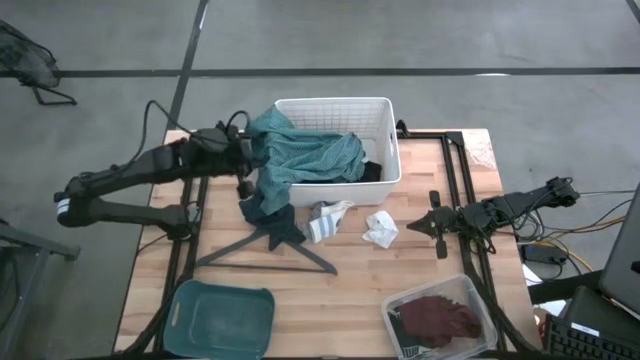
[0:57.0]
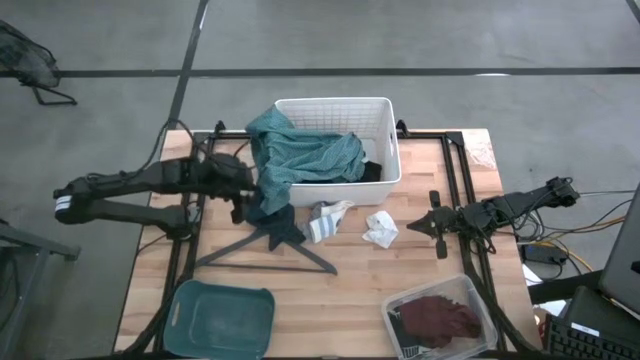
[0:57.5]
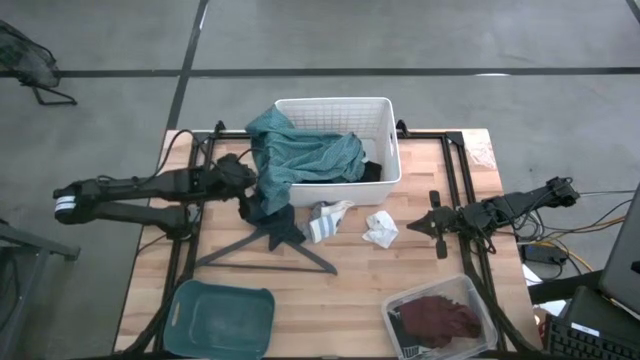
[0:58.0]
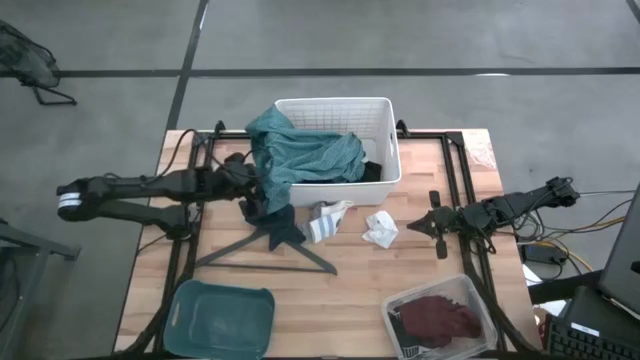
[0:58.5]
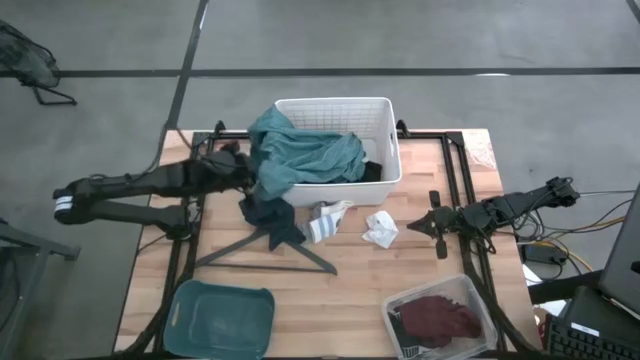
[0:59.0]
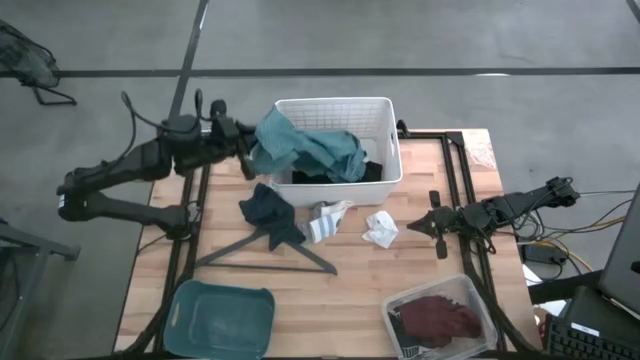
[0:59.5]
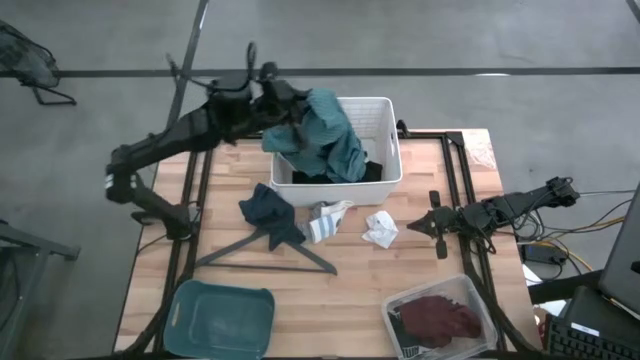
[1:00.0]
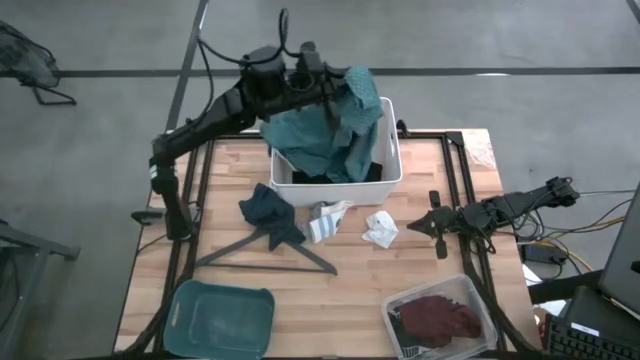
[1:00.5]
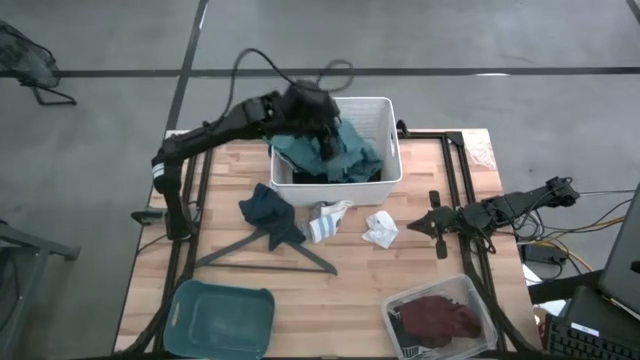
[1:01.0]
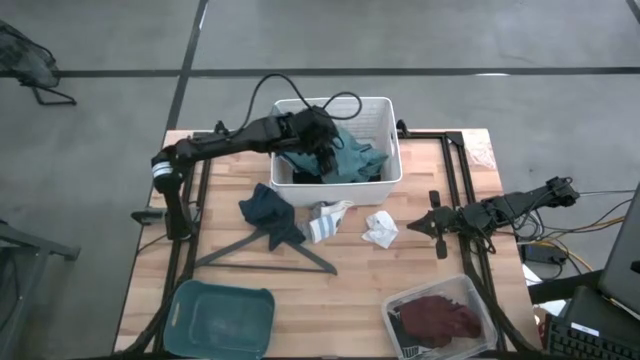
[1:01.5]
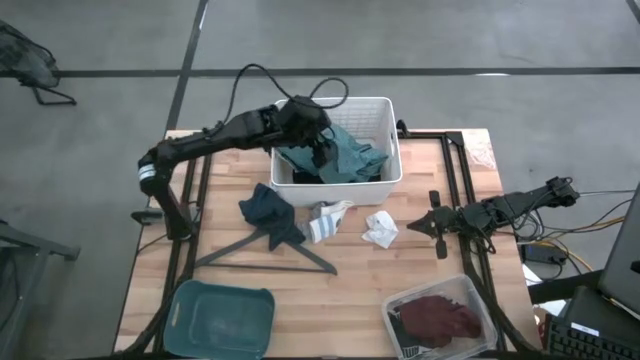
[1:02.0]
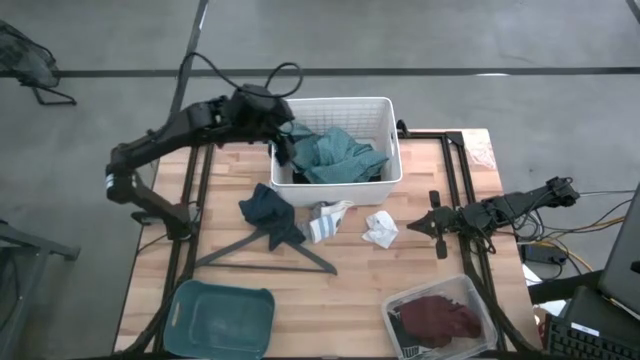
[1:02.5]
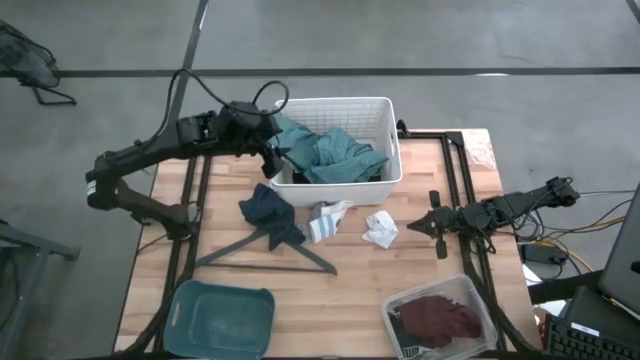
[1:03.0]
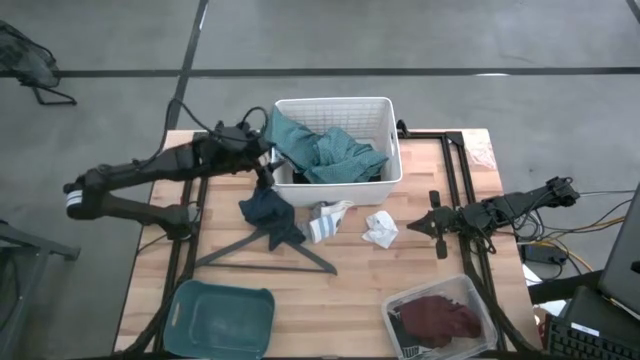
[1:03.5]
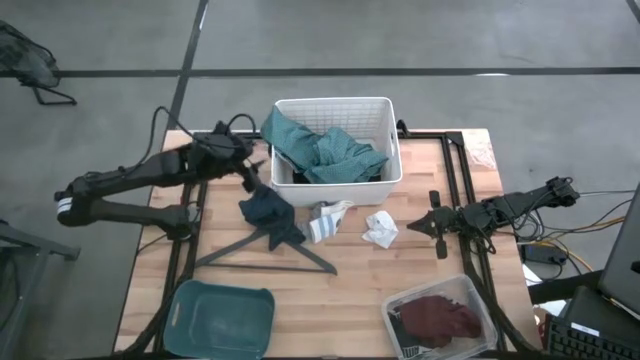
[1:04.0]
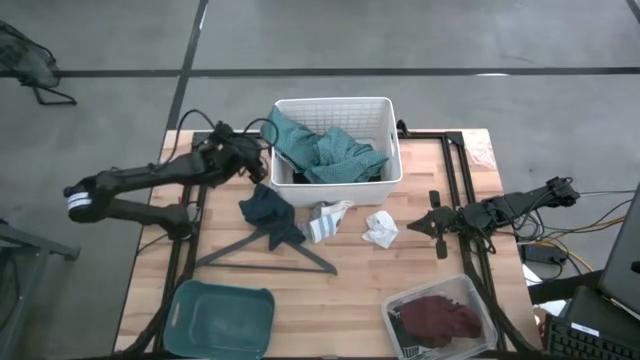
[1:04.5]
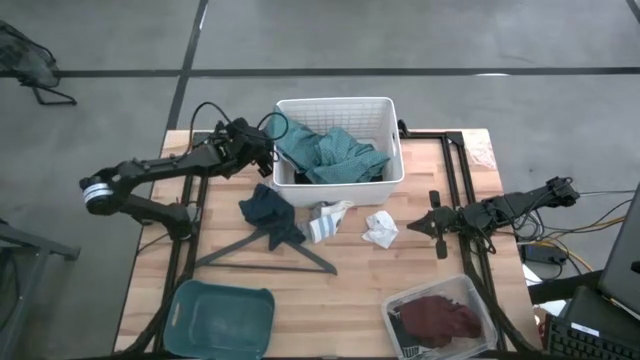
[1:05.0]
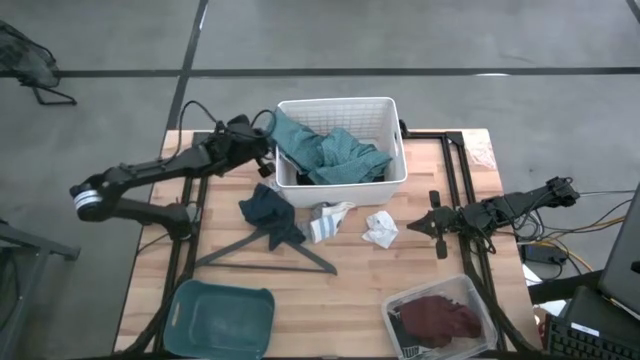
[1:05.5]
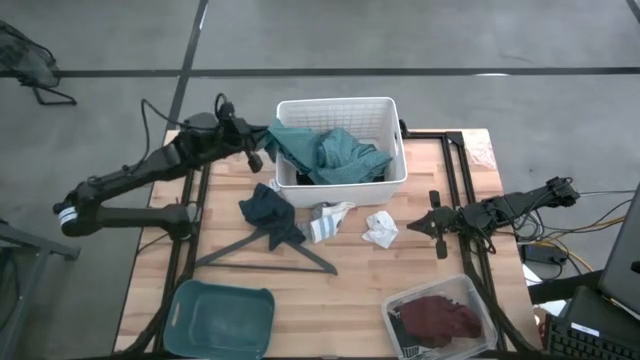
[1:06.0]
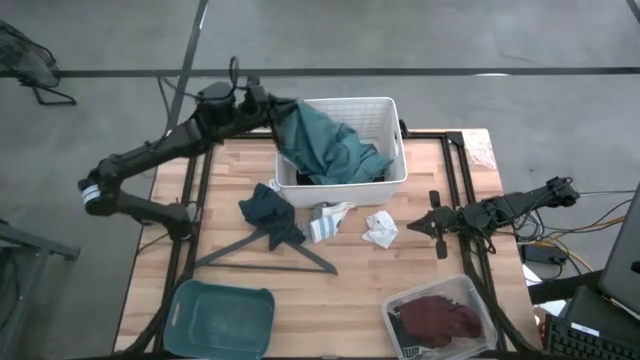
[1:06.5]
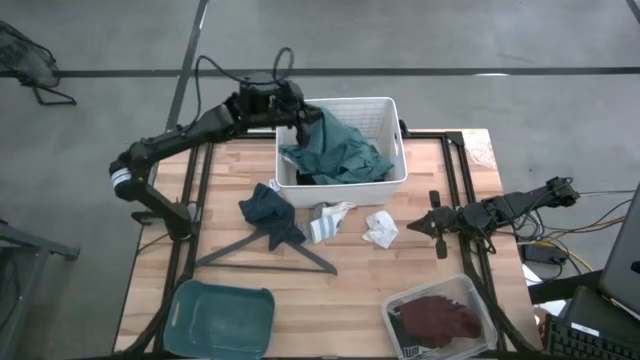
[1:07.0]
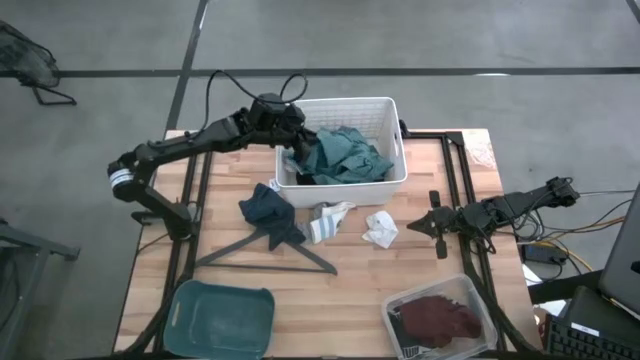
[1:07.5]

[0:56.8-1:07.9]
Task: Pick & Place Cloths
Put the blue polo into the white laundry bin

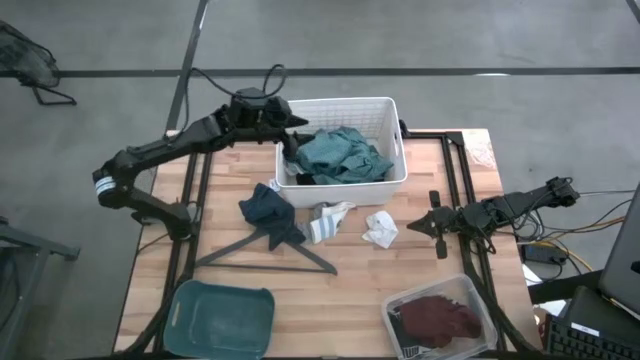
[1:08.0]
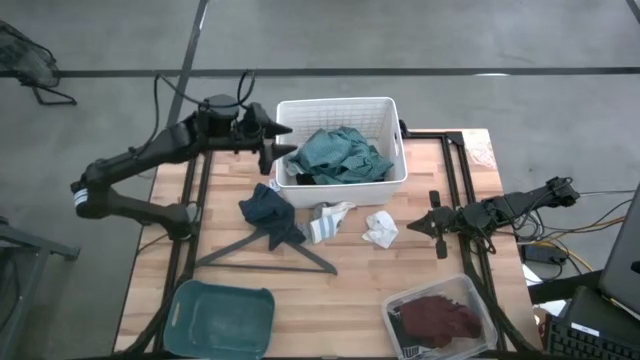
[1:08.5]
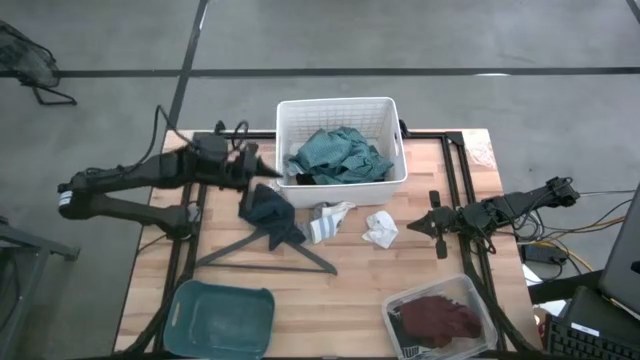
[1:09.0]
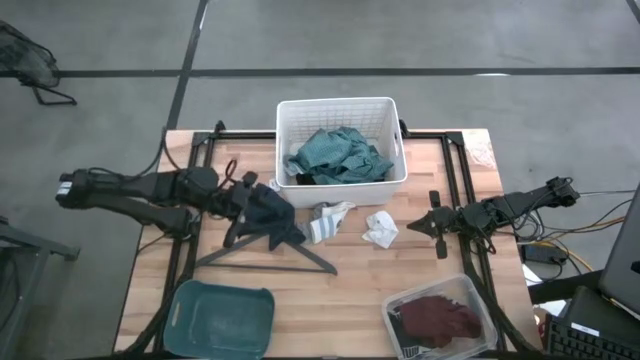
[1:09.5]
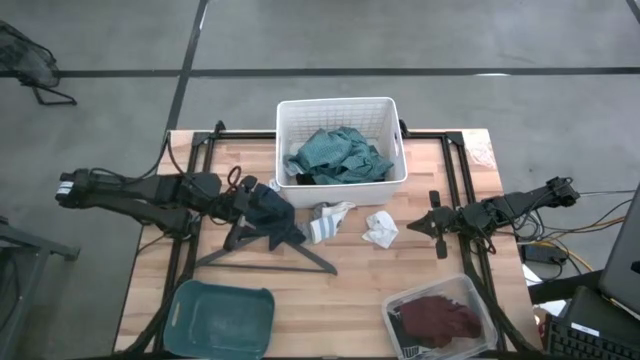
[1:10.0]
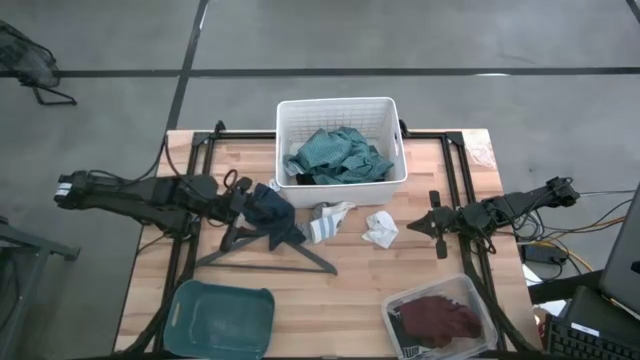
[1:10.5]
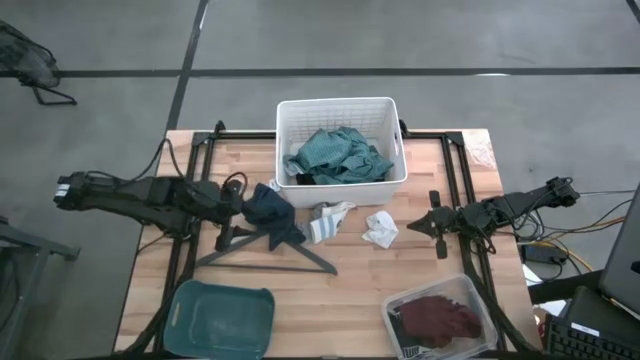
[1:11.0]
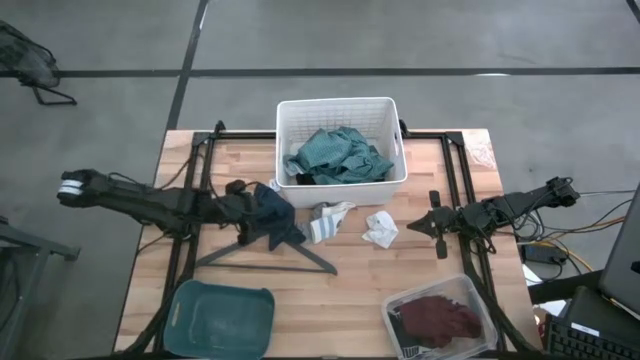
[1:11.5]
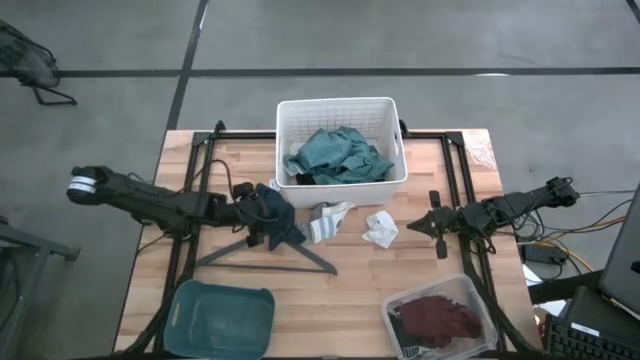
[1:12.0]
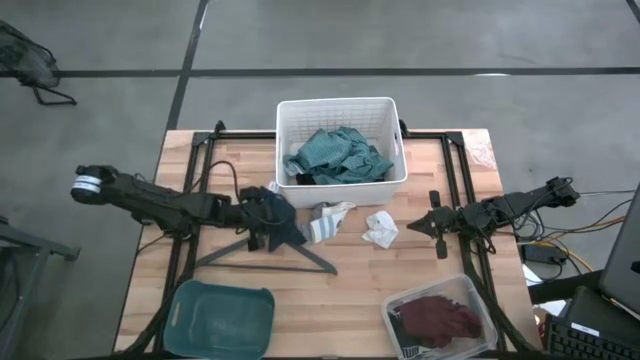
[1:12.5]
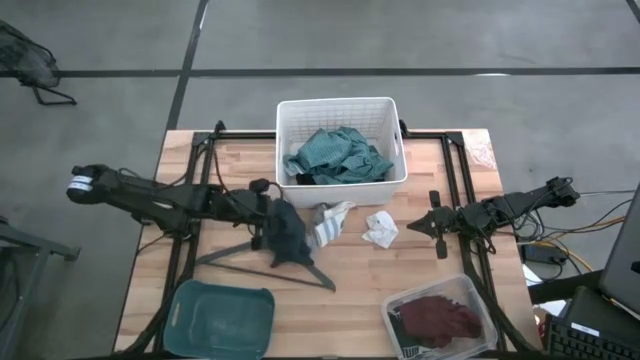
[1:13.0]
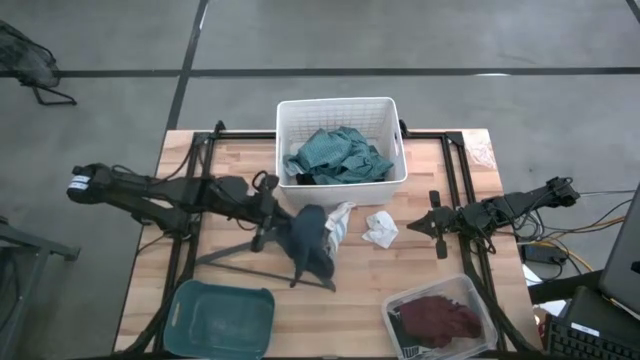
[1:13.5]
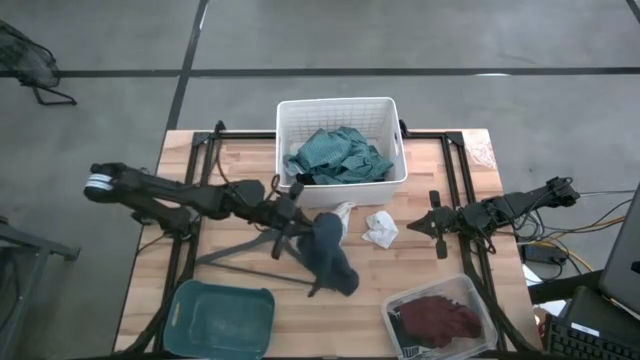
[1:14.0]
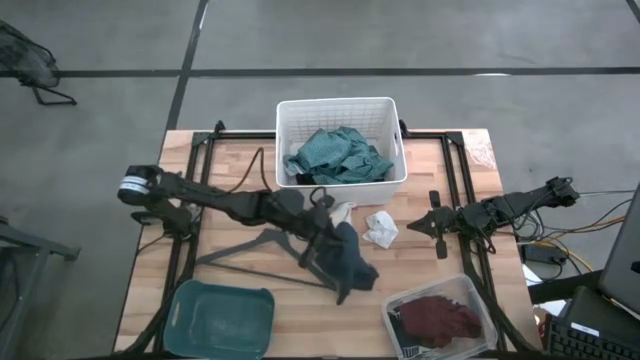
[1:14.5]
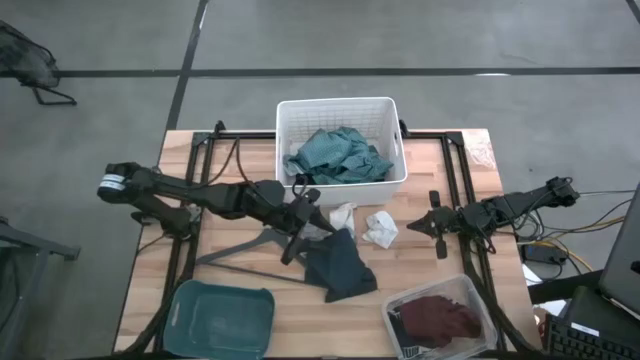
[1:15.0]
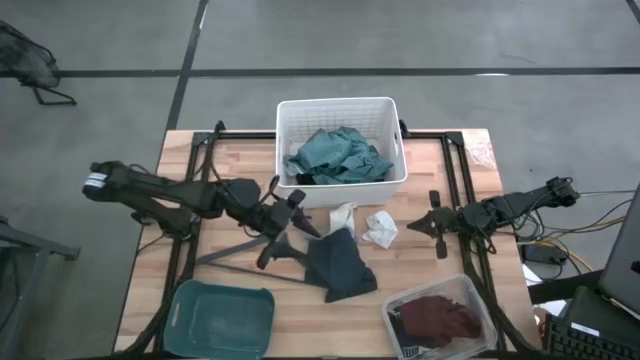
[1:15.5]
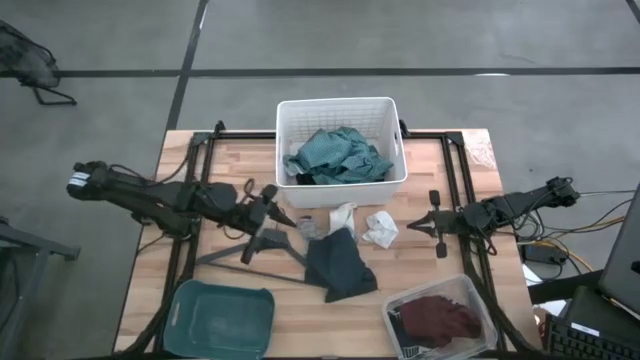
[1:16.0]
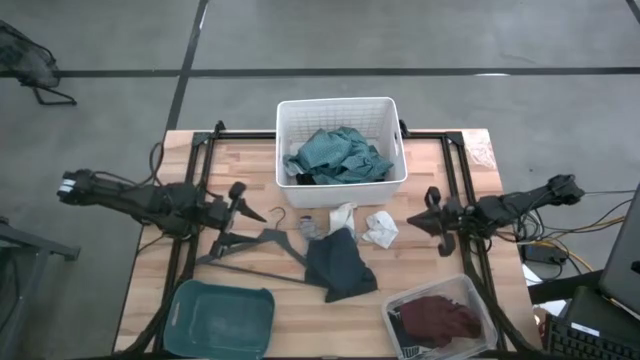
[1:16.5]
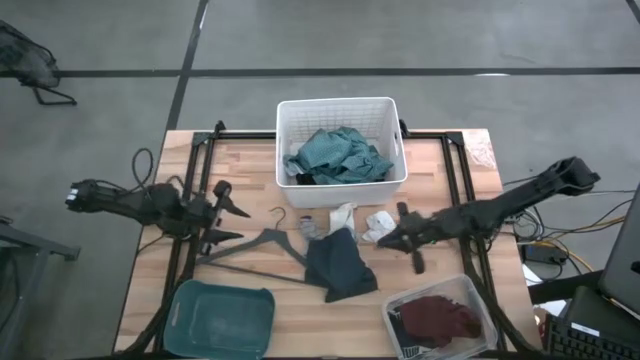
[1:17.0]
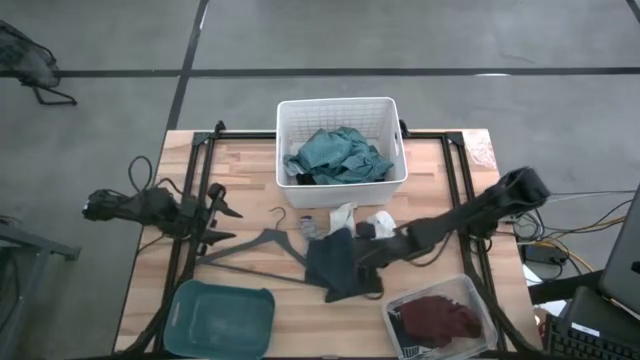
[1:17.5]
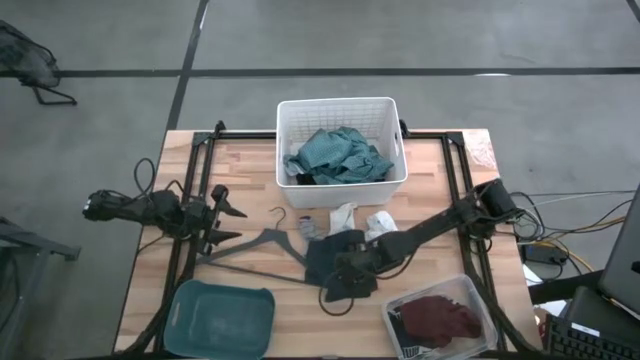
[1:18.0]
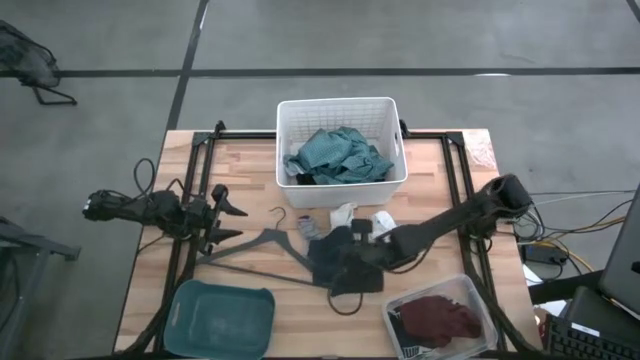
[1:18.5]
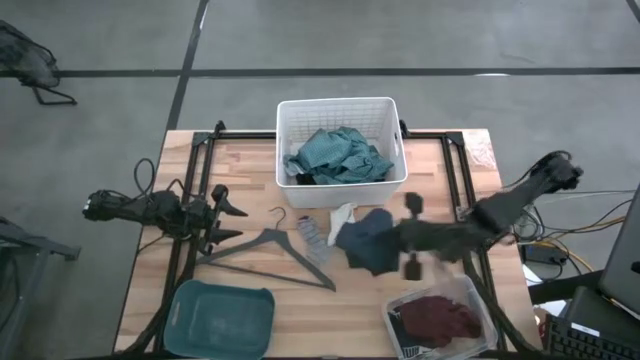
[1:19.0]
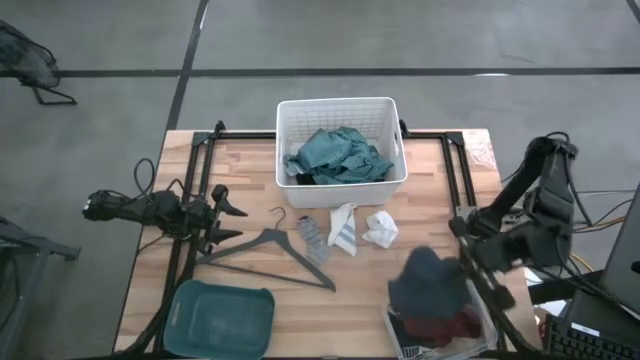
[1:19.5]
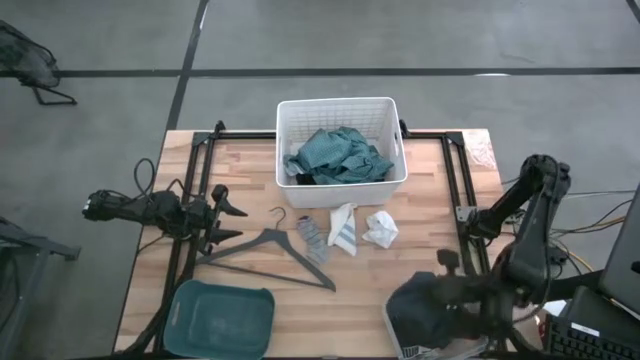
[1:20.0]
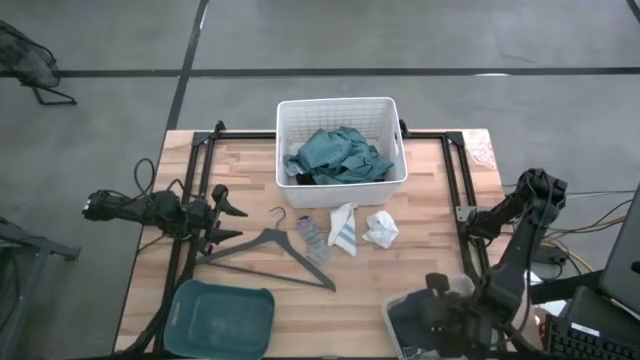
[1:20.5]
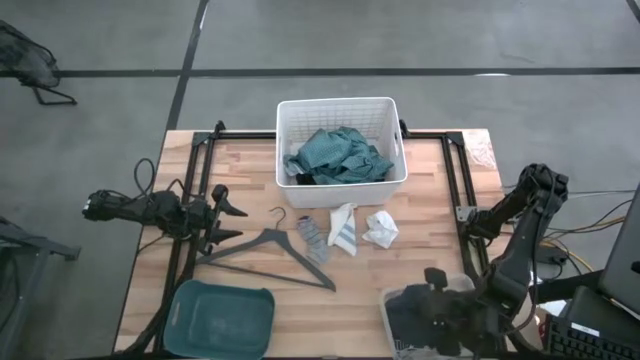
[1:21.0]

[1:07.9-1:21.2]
Put the dark blue shorts into the transparent bin
